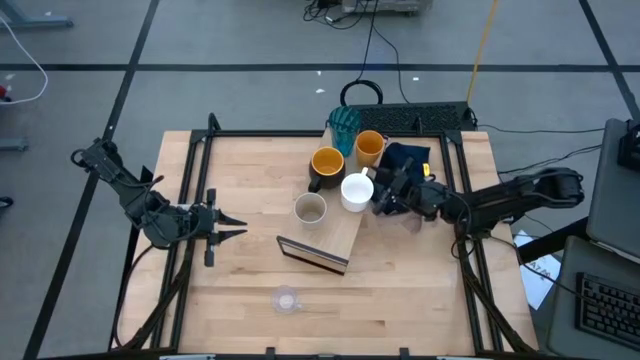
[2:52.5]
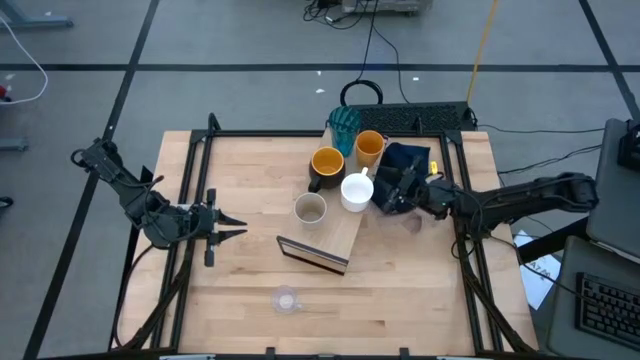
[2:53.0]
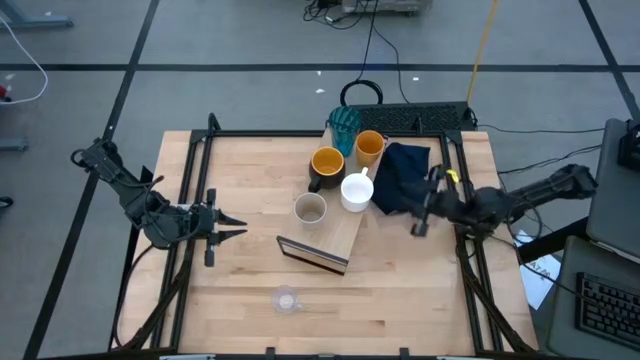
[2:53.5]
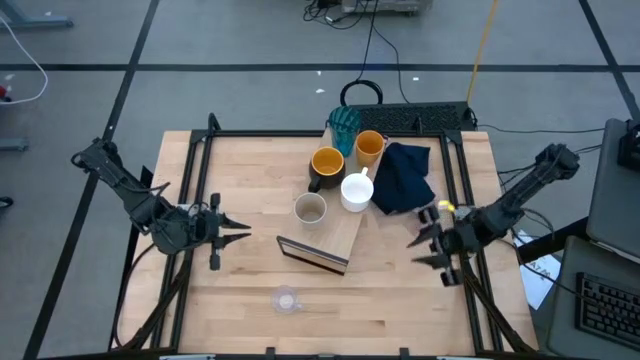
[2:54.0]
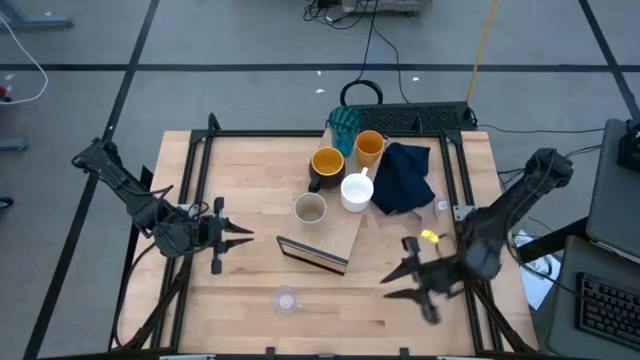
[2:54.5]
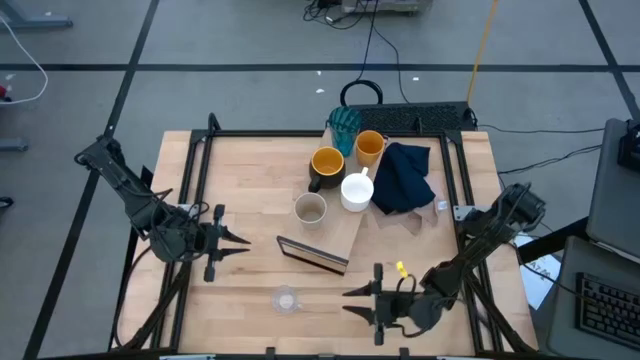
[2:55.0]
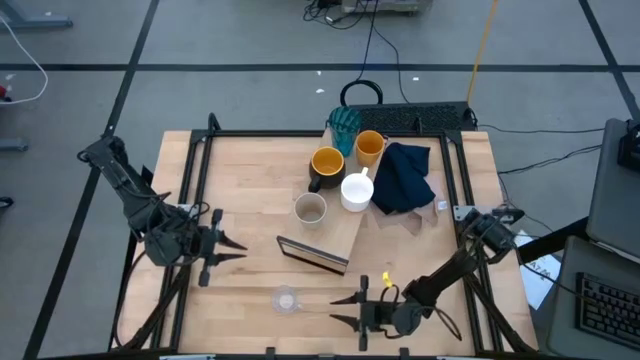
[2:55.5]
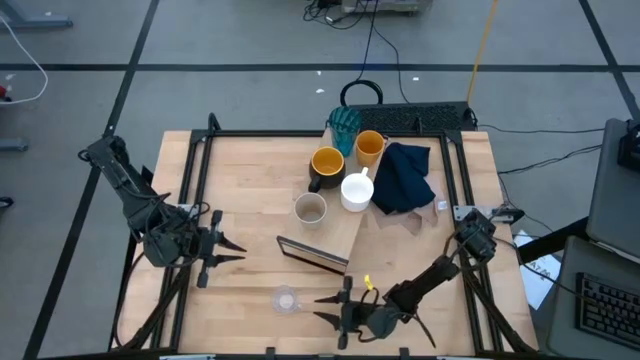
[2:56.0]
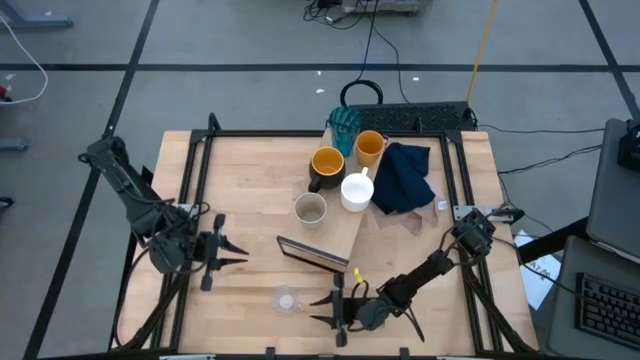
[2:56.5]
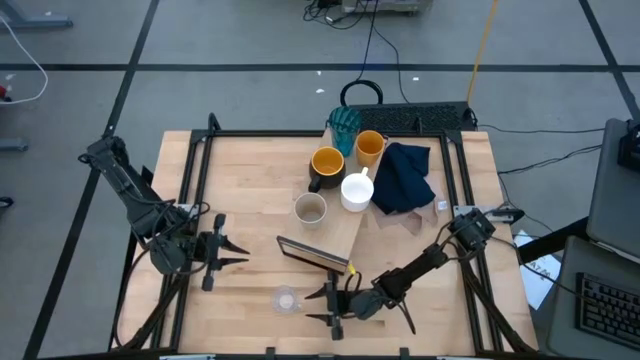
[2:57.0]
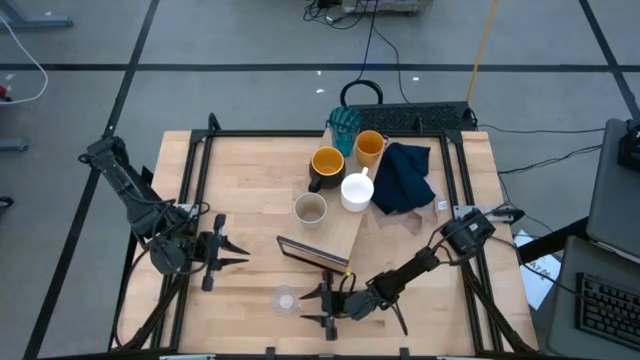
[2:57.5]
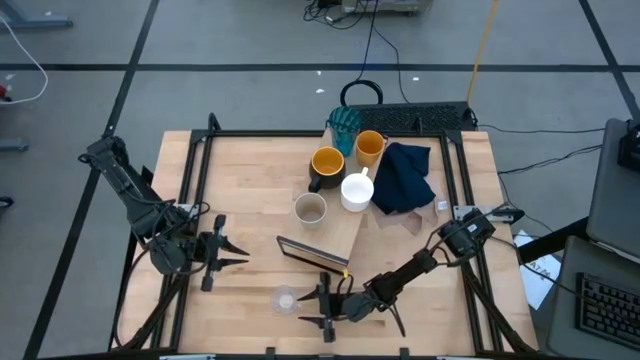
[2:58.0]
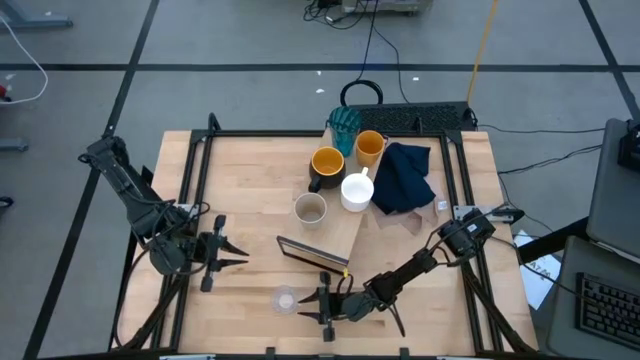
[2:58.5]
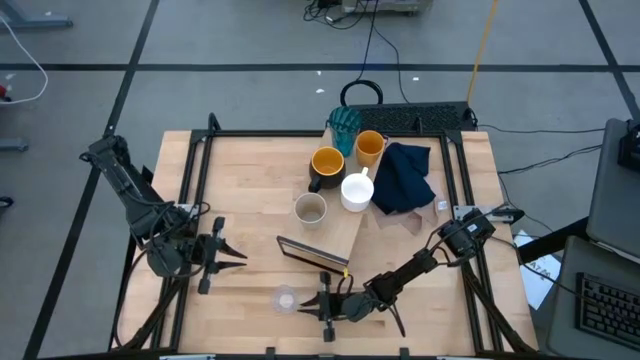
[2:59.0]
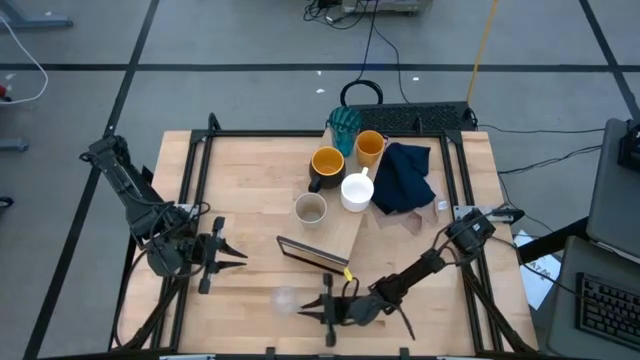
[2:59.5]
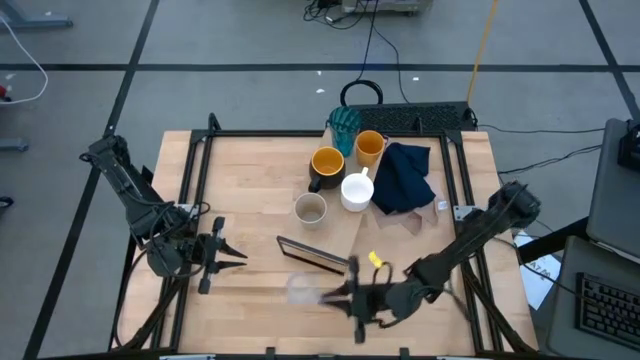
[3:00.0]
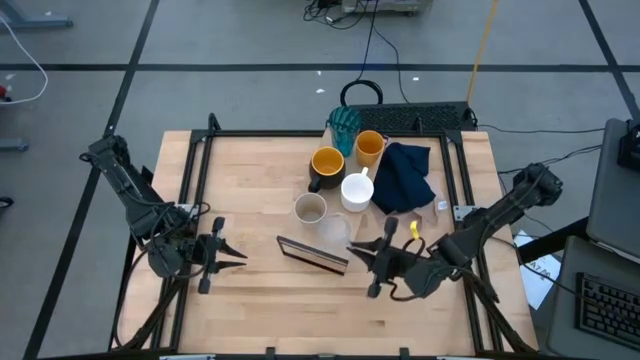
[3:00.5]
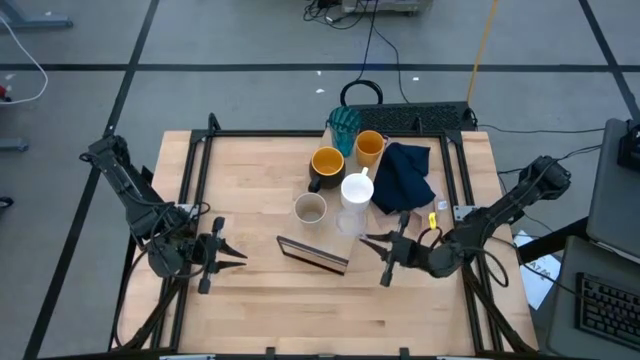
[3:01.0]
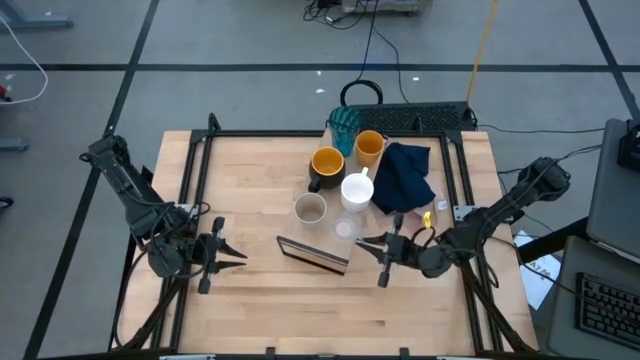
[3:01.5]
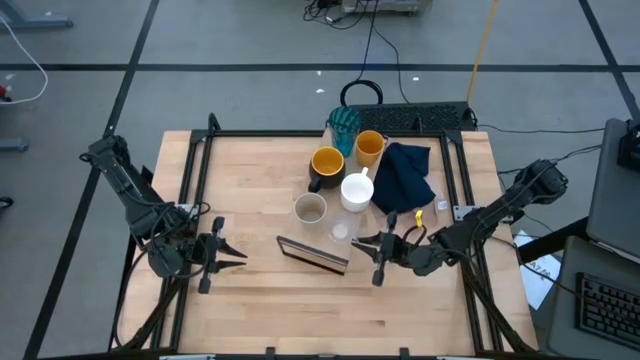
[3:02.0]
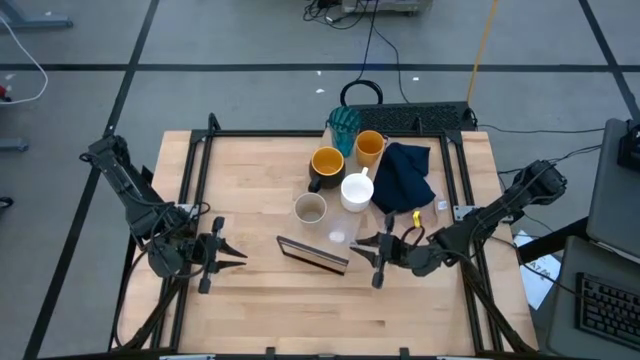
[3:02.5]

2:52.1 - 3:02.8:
Task: Stack small to large cups/mugs on shelf
Put the transparent mug on the shelf

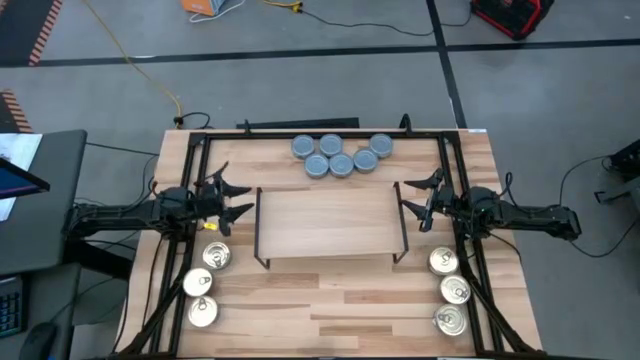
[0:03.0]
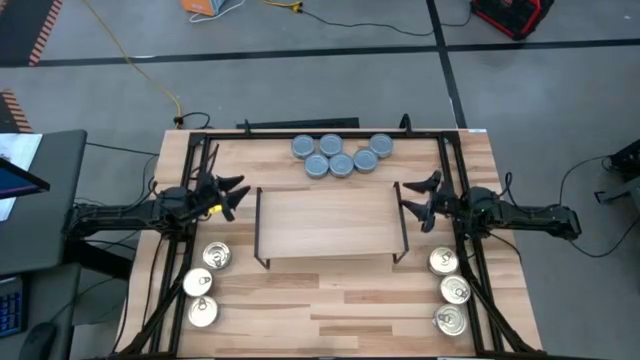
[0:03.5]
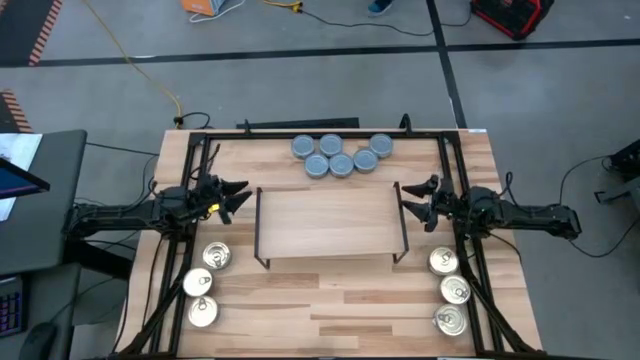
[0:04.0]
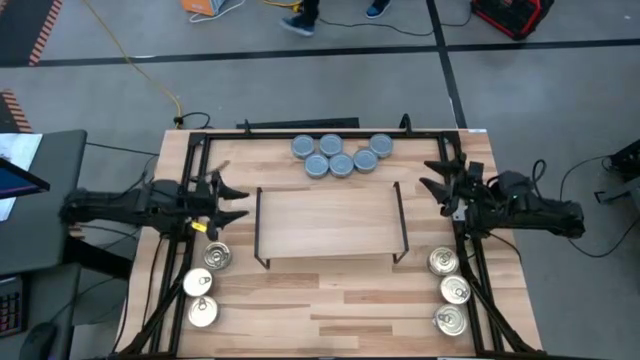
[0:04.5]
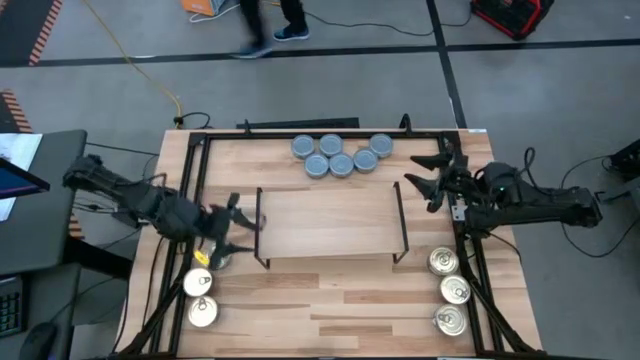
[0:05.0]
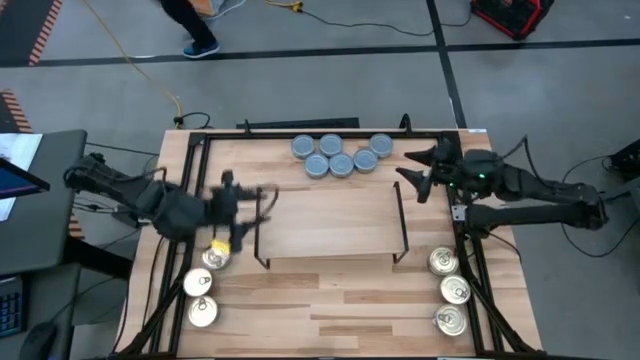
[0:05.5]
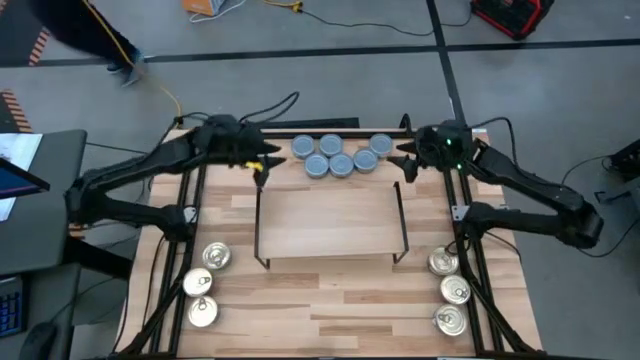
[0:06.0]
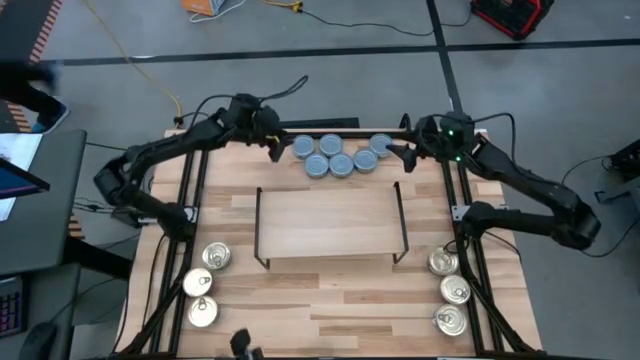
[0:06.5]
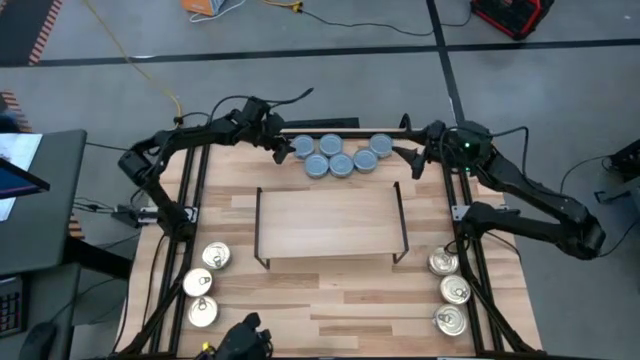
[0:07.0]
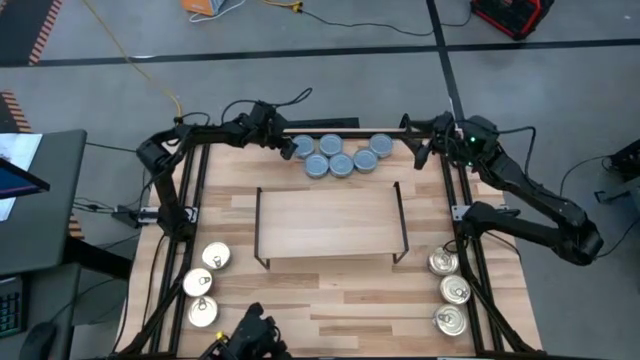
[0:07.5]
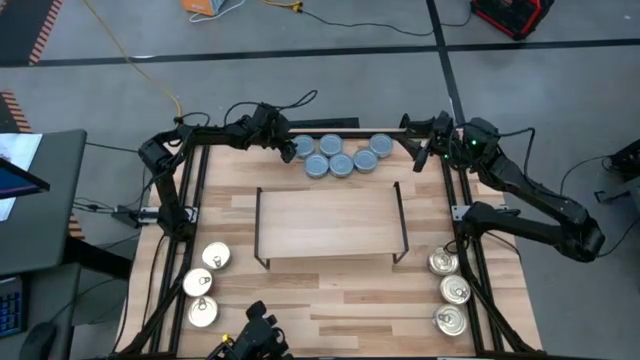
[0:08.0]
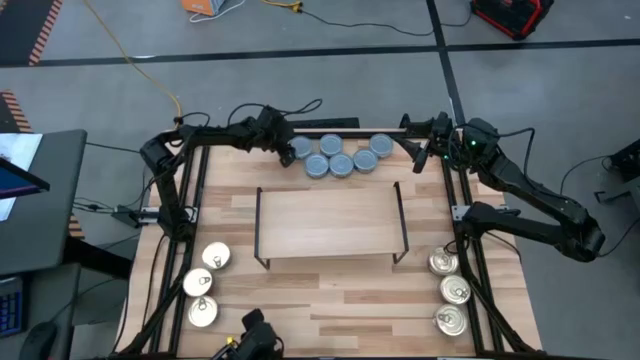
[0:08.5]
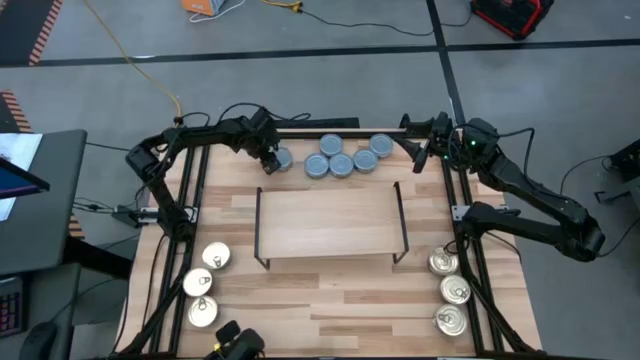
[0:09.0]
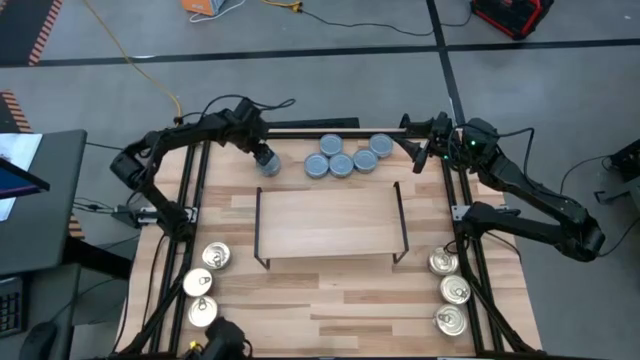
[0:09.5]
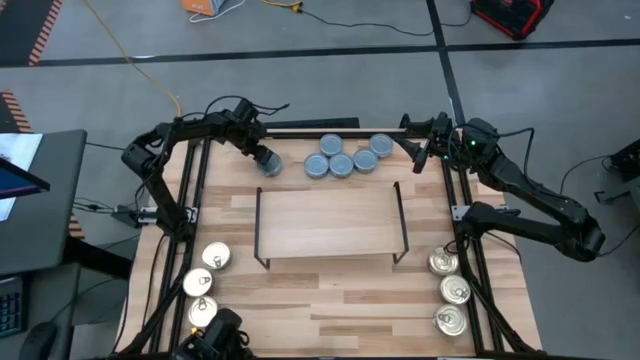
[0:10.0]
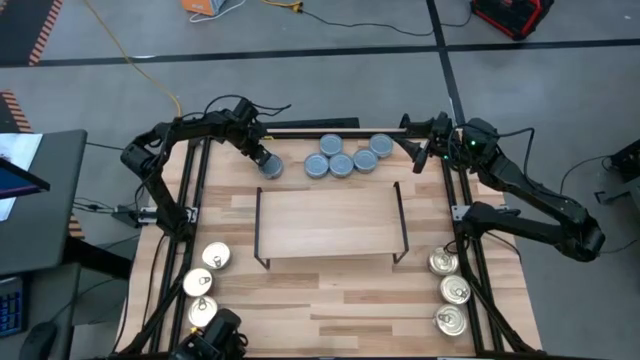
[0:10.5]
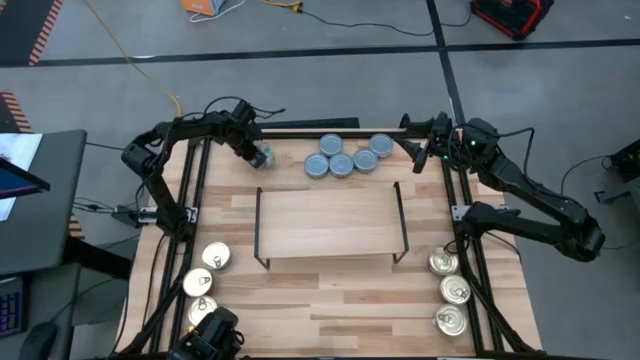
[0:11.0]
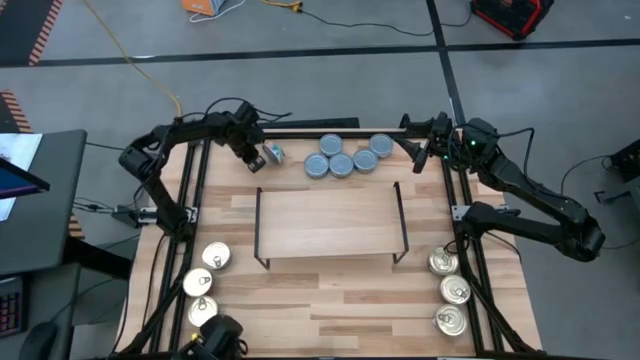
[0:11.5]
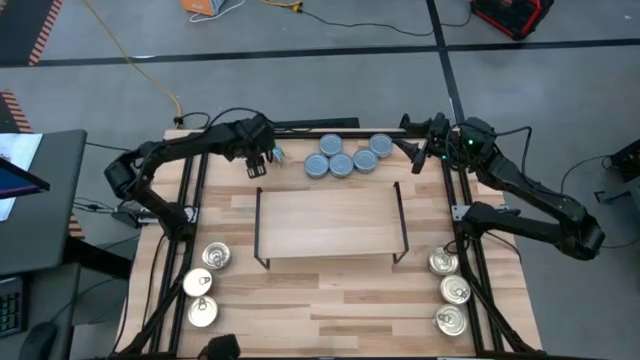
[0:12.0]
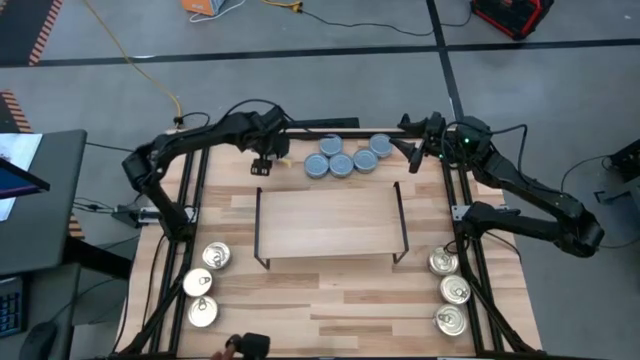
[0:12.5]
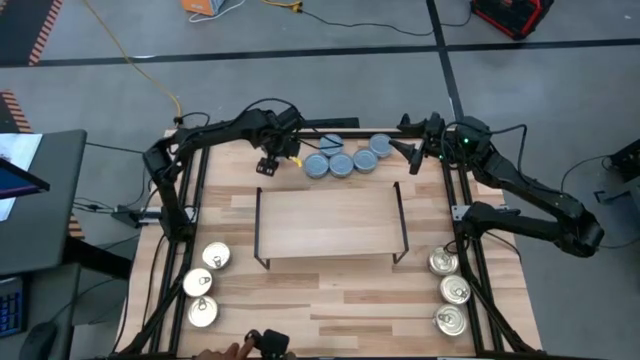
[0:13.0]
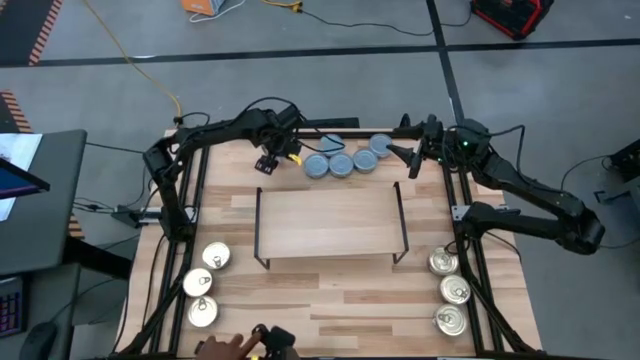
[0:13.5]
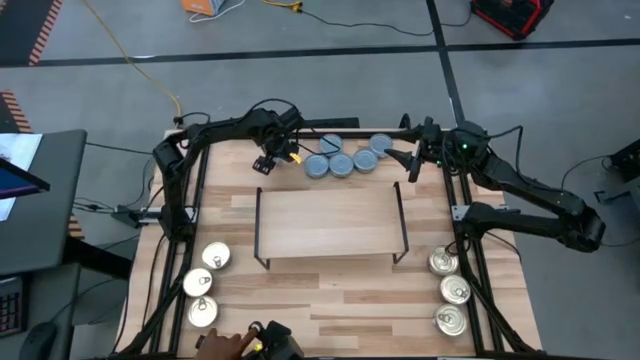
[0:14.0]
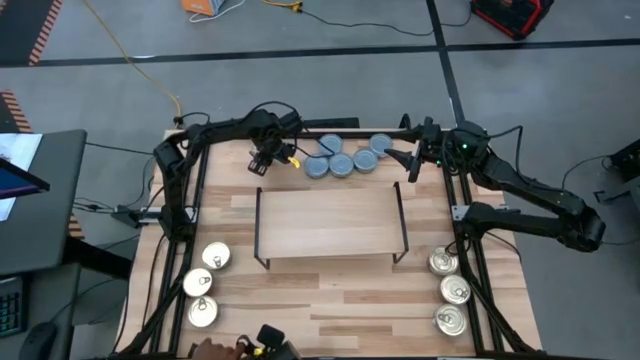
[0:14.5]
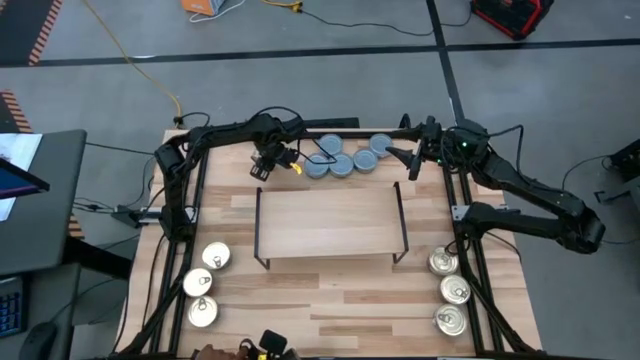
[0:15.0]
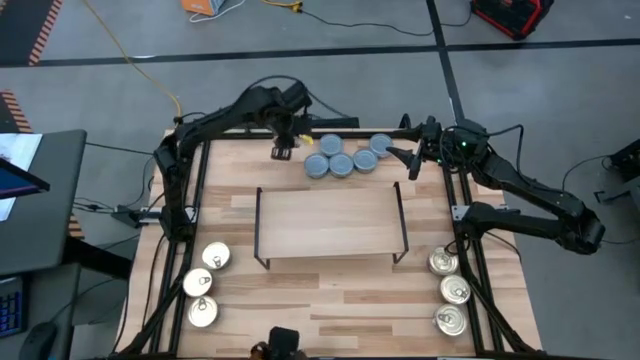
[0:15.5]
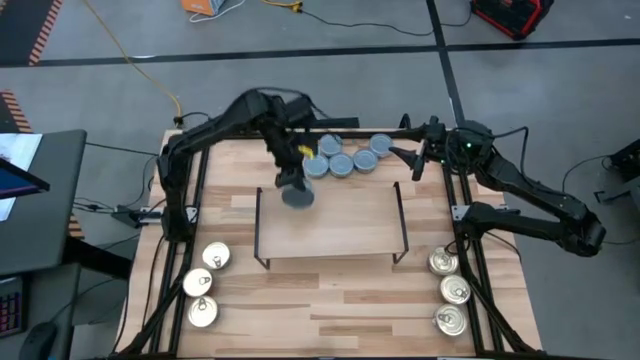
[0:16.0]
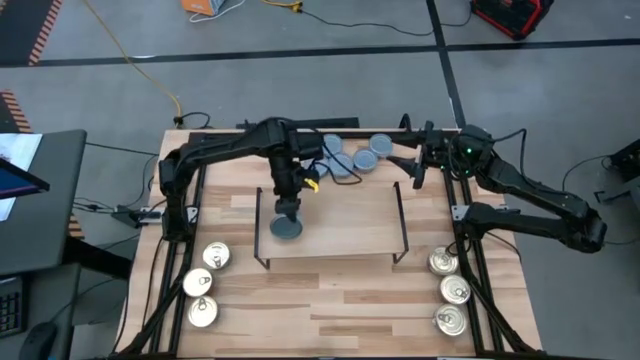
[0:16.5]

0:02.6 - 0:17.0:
Task: Stack canned seafood by type on shelf
Put the green tuna can on the shelf
